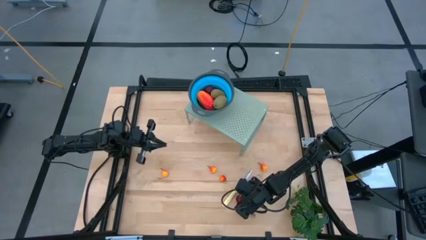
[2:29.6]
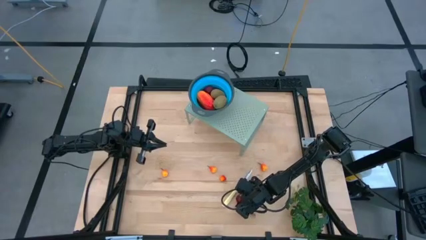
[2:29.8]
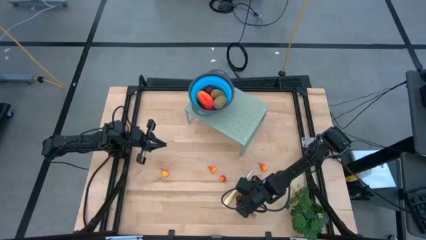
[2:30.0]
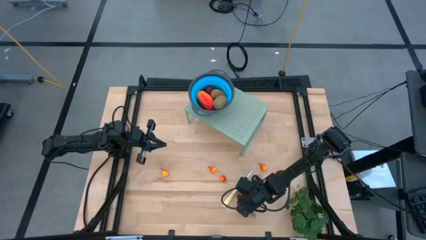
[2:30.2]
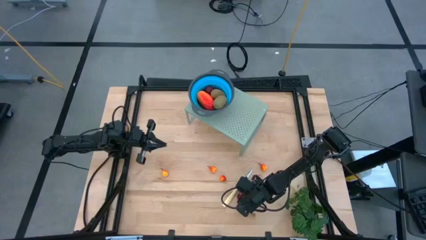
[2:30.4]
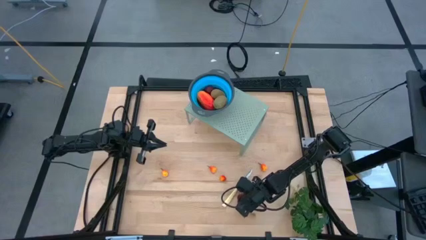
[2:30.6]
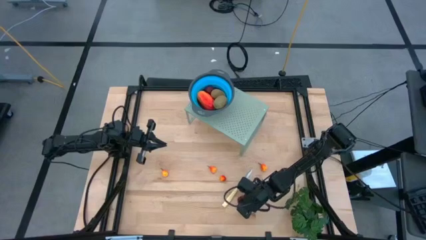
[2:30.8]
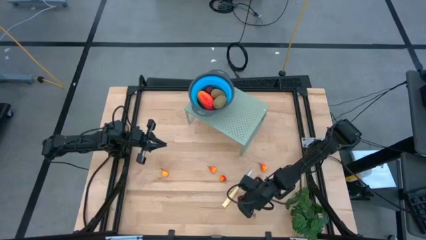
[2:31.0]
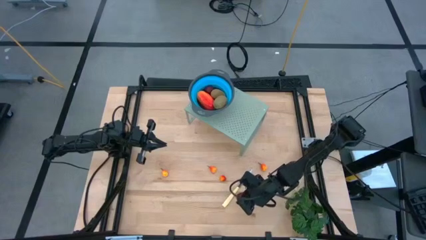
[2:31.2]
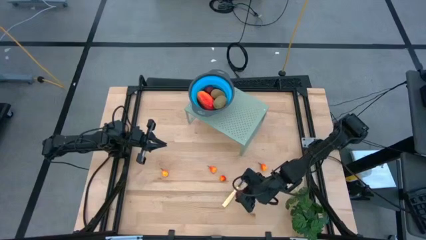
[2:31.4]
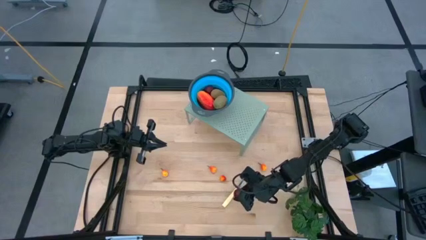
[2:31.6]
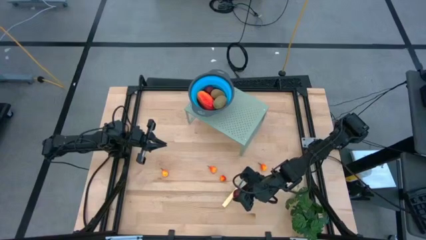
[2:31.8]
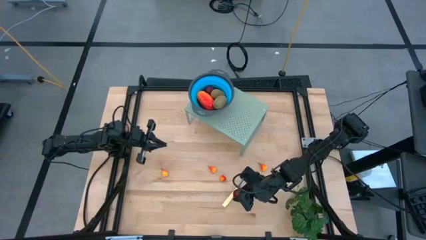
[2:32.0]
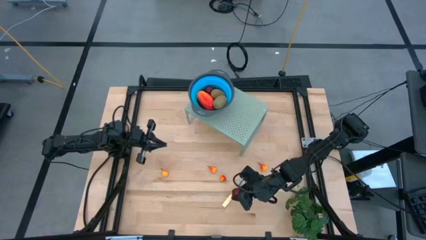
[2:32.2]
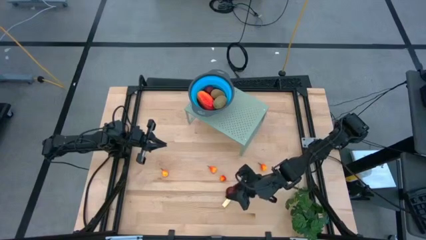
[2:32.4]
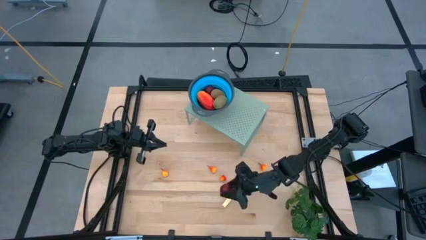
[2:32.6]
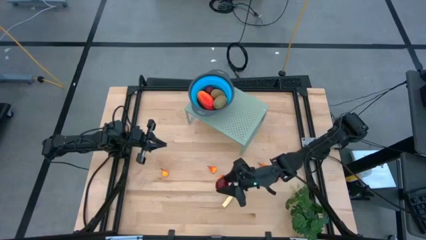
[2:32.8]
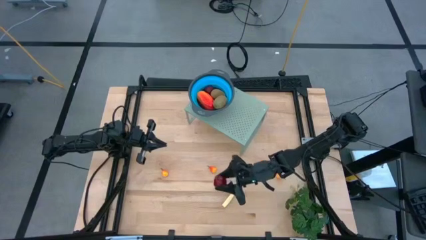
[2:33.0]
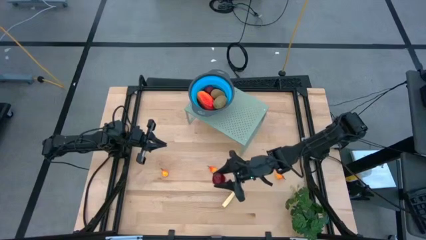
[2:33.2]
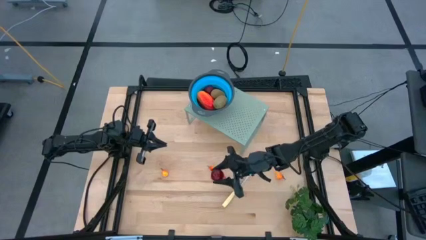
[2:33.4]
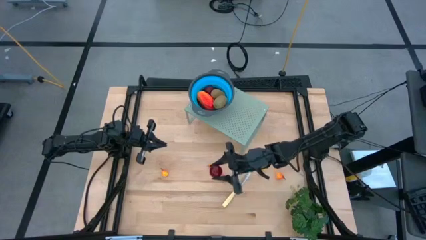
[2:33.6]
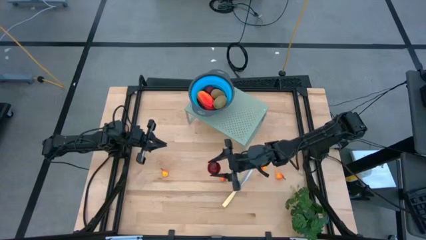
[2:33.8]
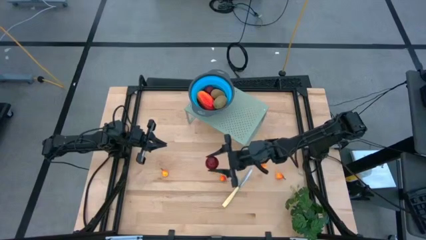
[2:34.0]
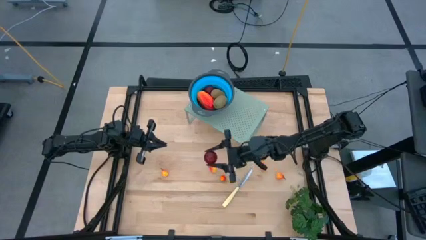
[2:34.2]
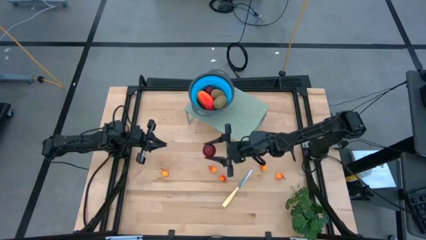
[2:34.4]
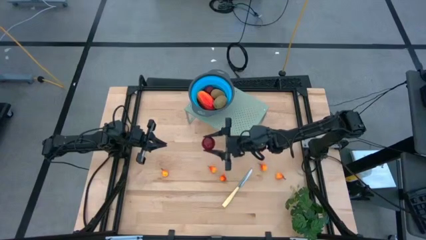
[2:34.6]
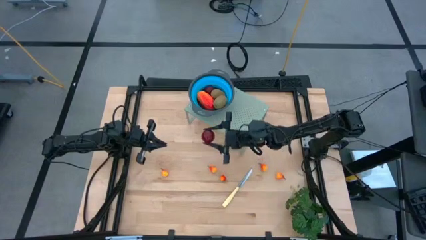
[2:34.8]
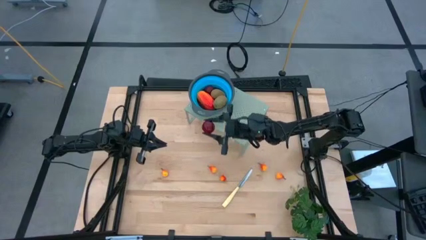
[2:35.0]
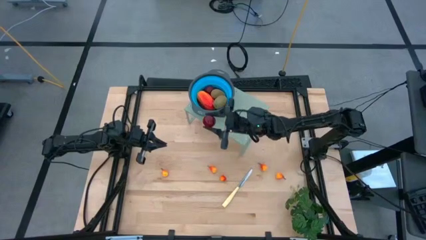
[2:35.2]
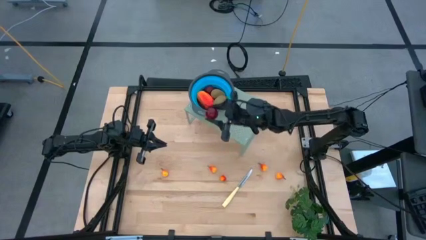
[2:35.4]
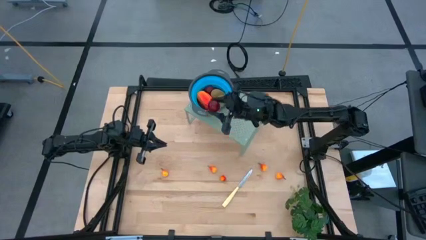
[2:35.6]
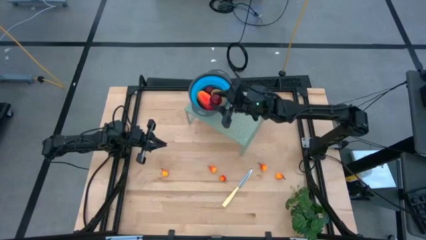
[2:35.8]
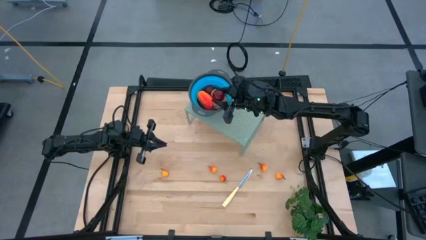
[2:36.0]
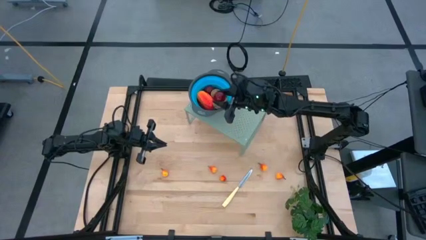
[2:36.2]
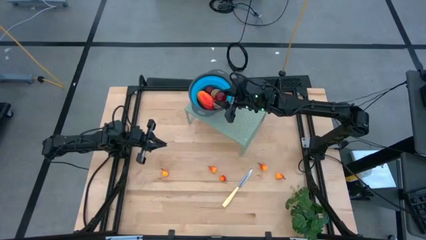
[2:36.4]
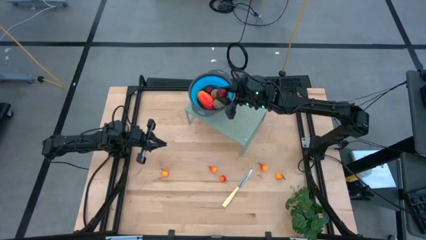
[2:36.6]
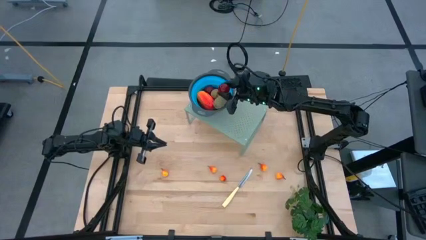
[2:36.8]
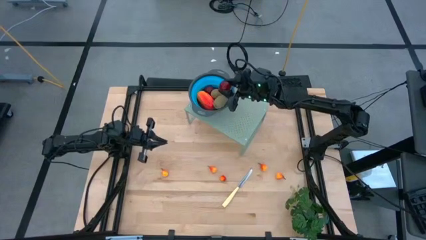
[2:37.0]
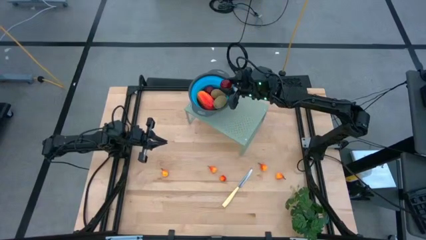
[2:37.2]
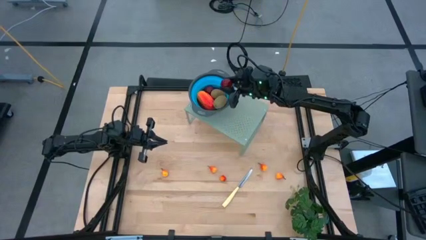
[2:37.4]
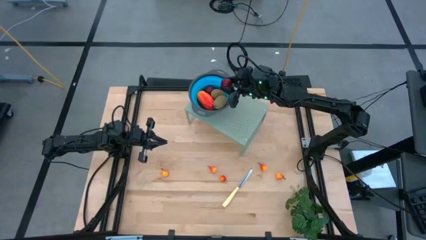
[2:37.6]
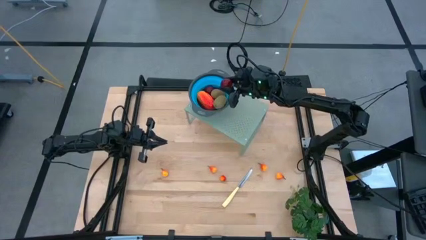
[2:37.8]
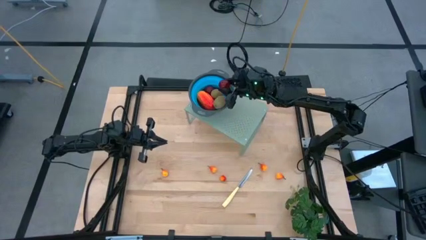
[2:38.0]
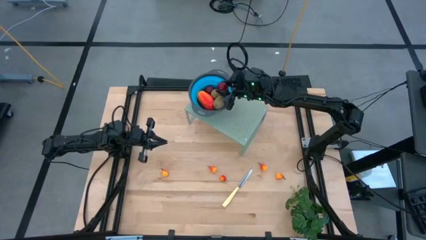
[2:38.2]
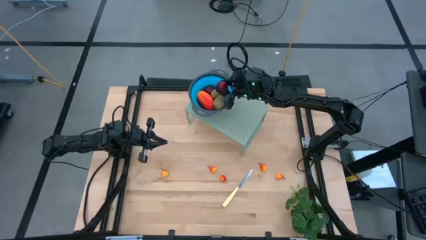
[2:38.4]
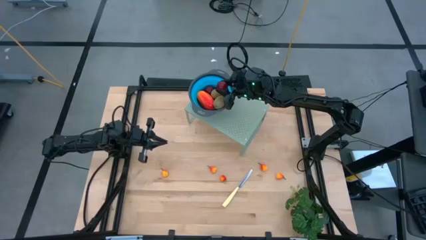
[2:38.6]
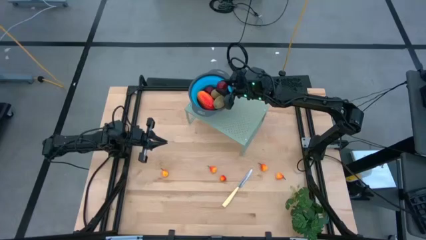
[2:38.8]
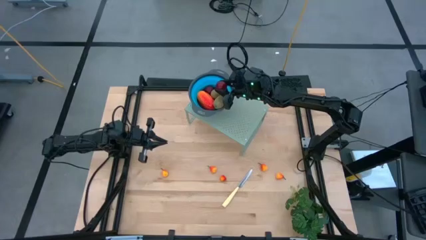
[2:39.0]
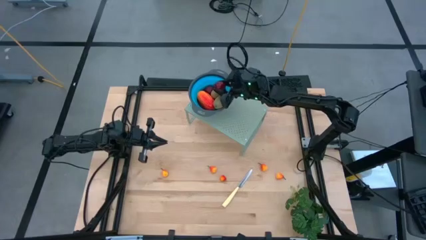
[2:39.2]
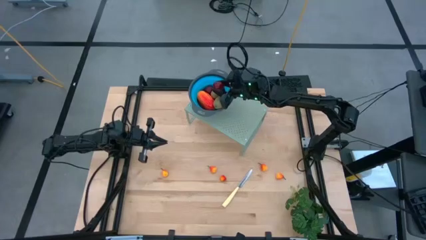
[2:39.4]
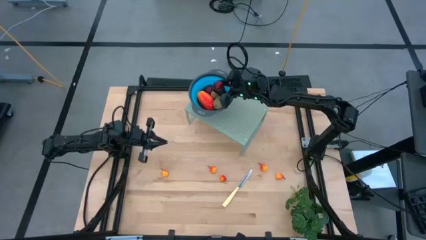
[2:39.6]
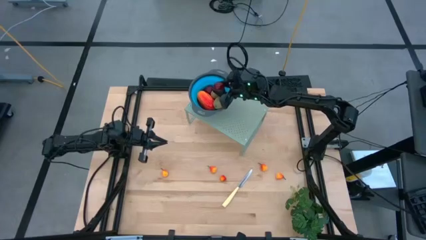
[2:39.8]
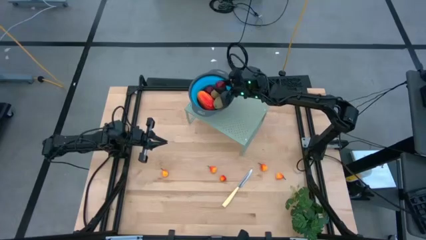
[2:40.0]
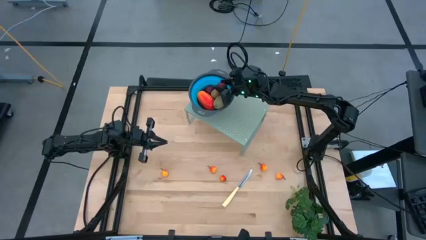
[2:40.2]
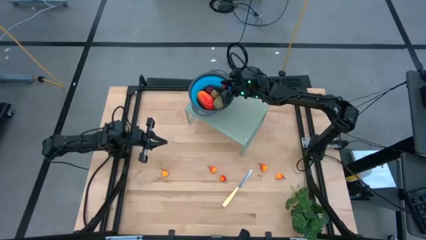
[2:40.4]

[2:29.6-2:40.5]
Task: Pick & Place Fruit
Put the pomegranate into the blue strainer bowl on the shelf
